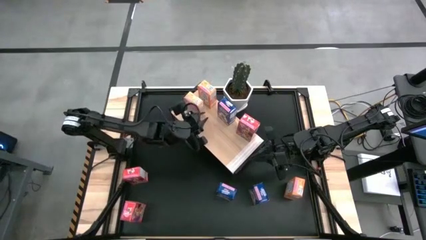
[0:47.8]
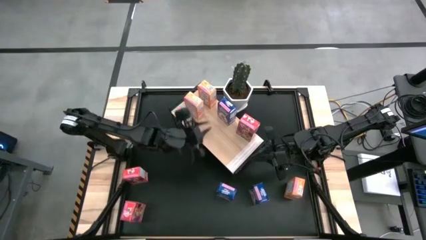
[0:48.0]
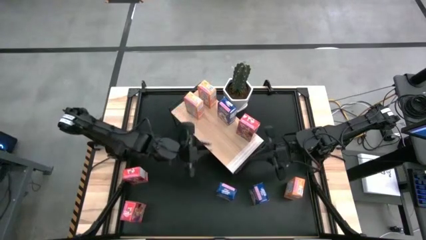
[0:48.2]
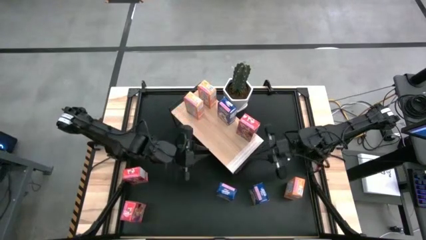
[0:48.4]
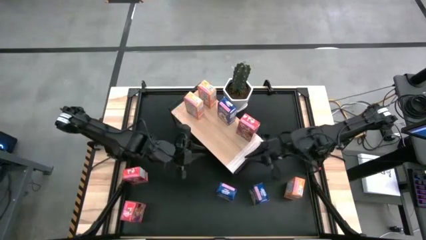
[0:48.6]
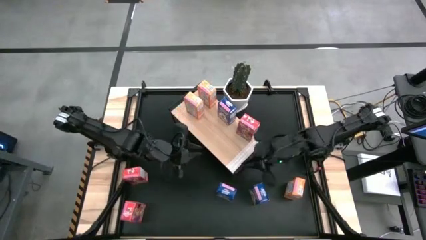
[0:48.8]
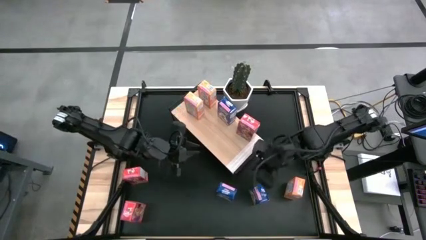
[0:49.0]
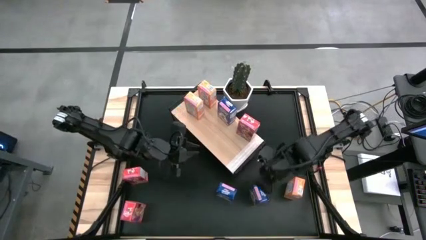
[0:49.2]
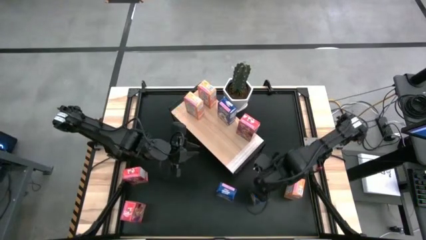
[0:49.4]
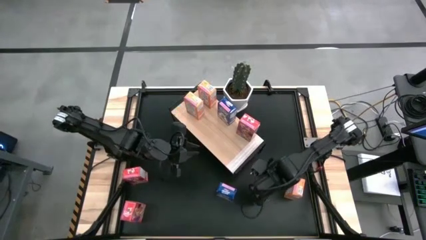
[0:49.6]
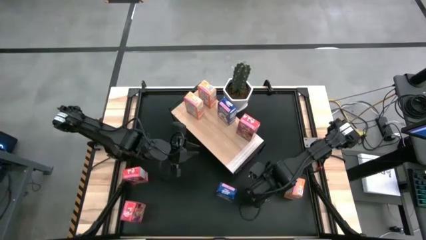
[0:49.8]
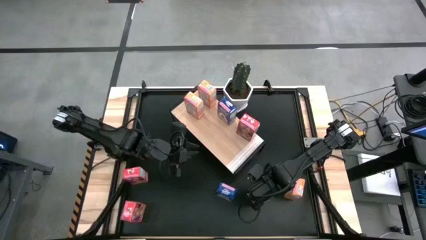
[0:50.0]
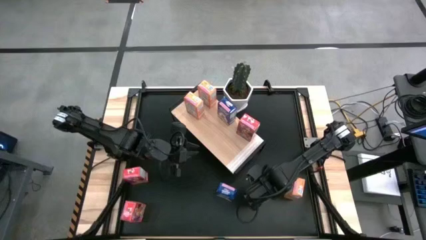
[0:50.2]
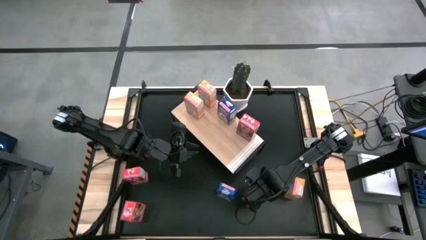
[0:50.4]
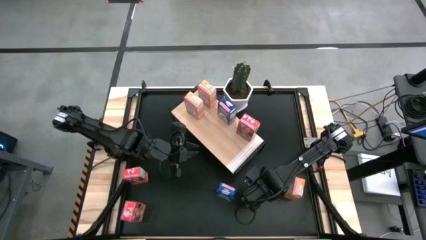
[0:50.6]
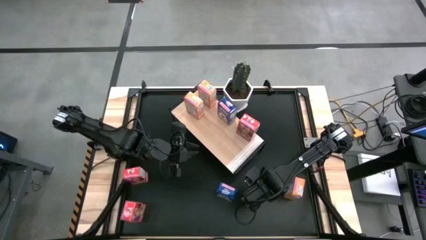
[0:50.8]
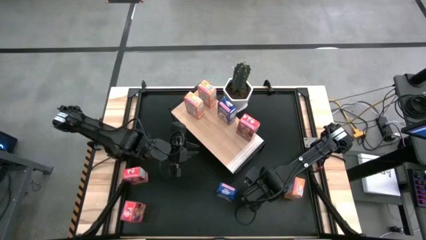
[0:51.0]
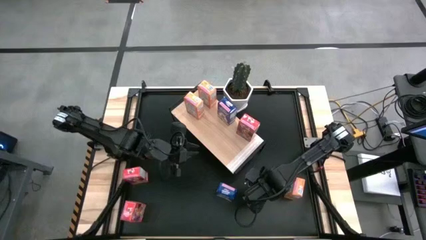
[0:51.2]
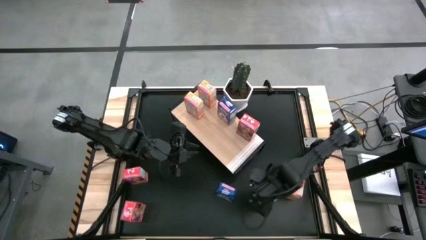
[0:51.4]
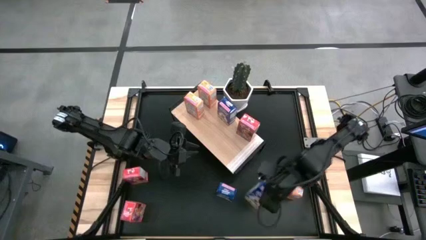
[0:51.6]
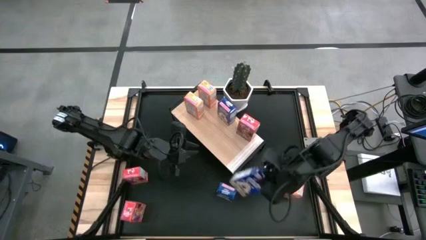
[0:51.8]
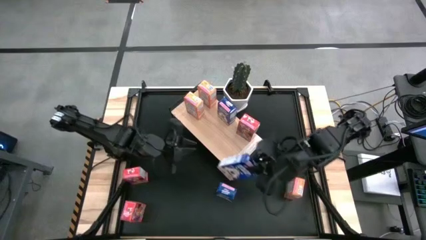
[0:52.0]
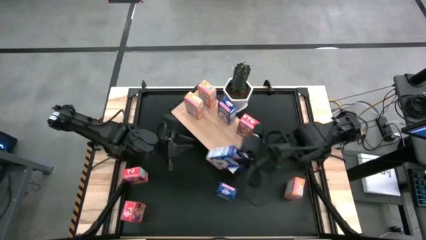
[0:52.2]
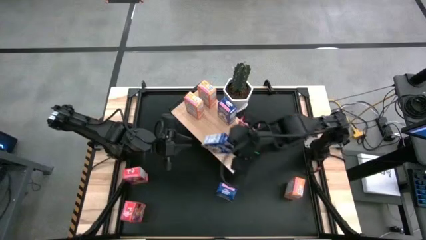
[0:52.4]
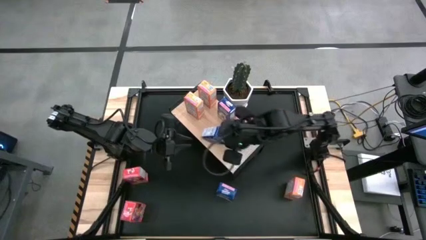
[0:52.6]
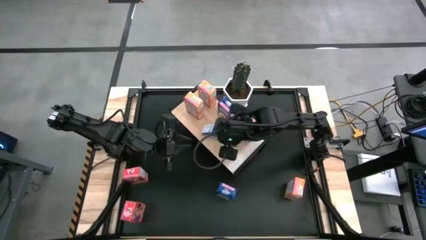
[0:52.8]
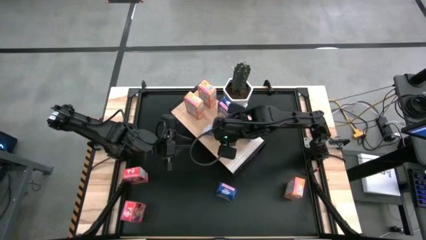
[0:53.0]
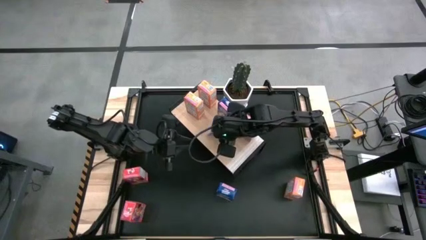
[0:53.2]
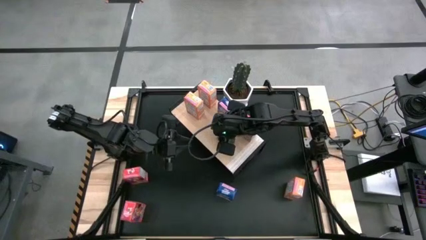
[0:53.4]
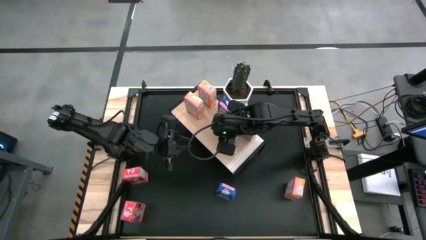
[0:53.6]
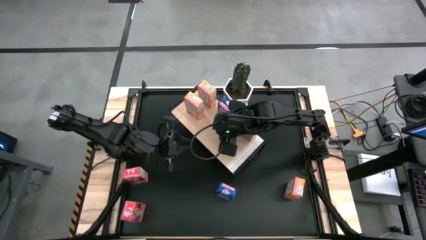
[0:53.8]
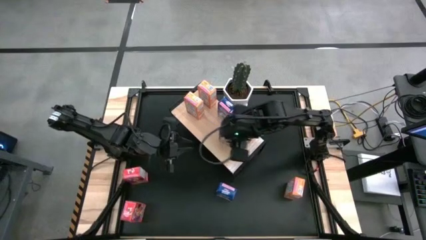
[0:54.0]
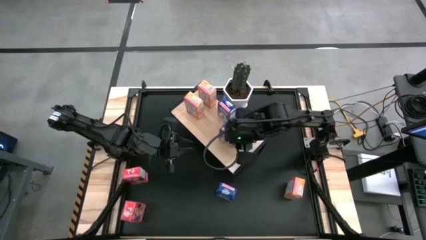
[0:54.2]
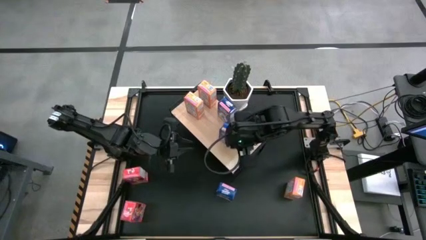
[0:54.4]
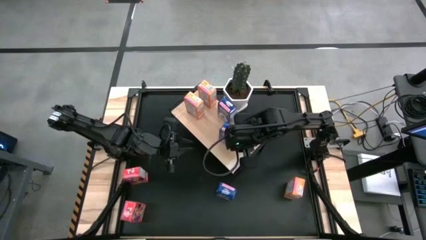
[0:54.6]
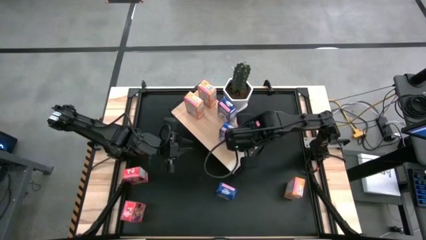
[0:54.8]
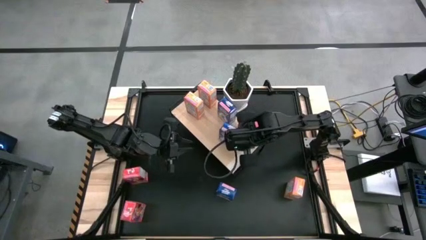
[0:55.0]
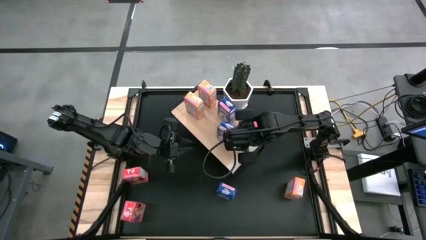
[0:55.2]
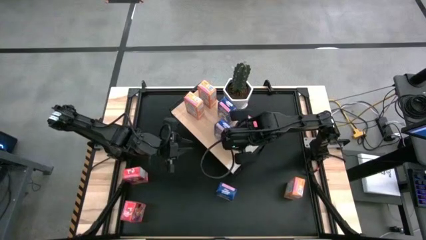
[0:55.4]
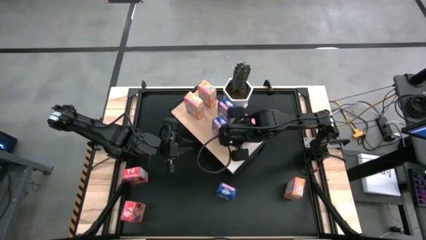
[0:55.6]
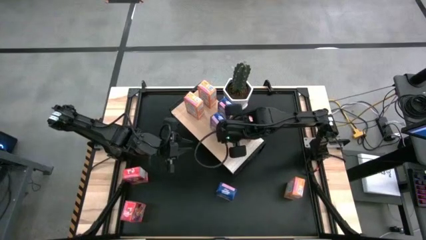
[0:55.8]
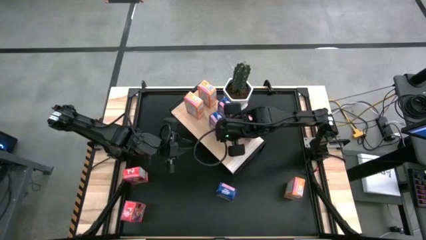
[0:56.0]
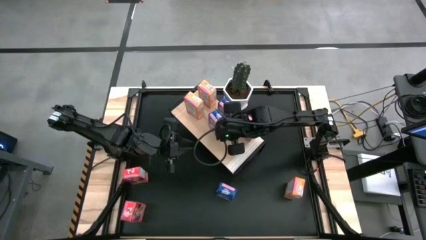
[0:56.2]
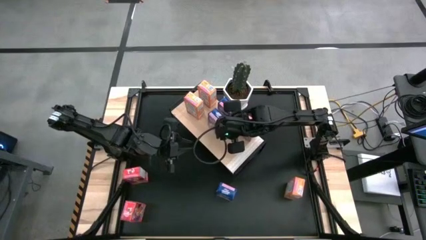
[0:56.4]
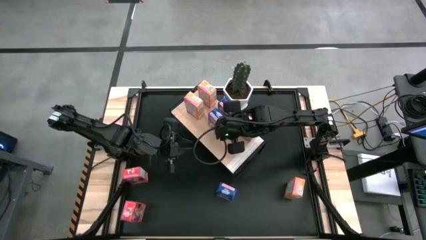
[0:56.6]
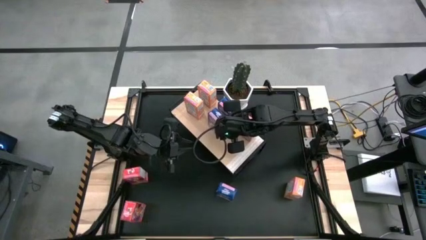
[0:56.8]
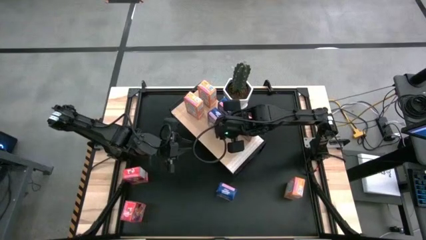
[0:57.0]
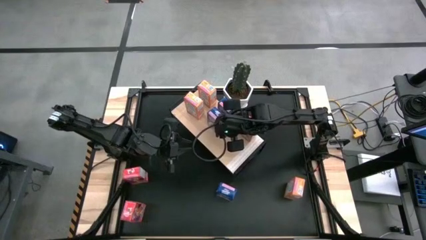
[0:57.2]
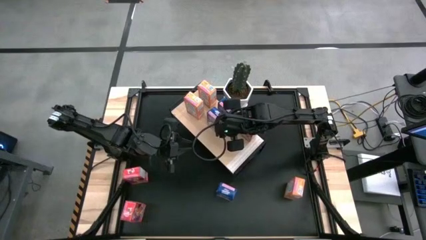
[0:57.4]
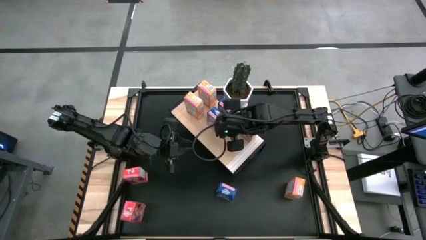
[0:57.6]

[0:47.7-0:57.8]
Task: Stack cereal on shelf
Put the right blue cereal box on the shelf aligned with the other blue cereal box

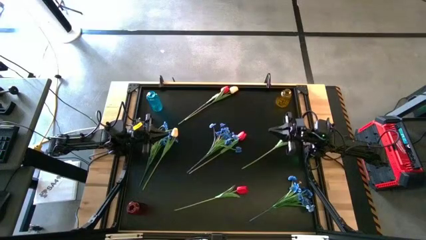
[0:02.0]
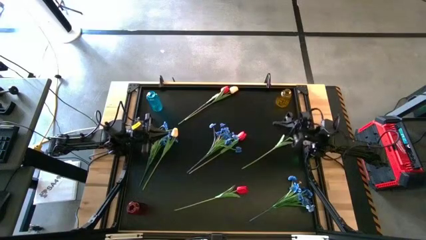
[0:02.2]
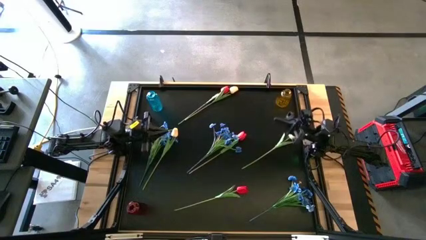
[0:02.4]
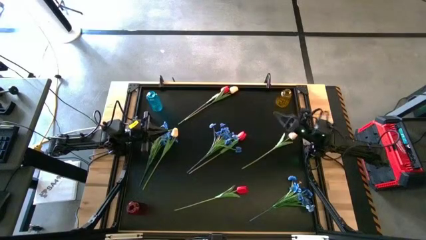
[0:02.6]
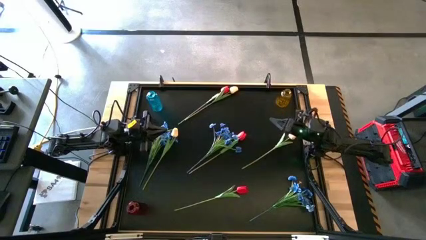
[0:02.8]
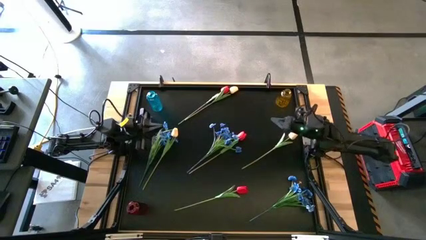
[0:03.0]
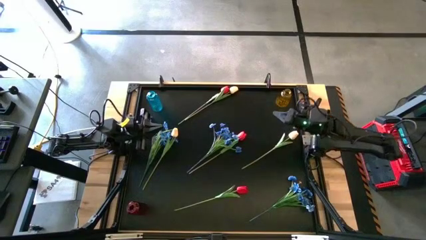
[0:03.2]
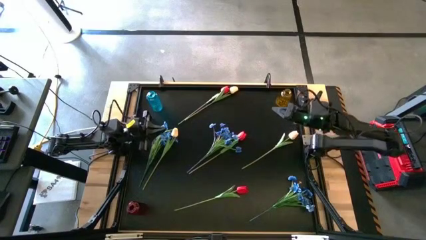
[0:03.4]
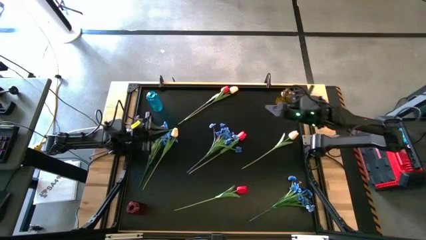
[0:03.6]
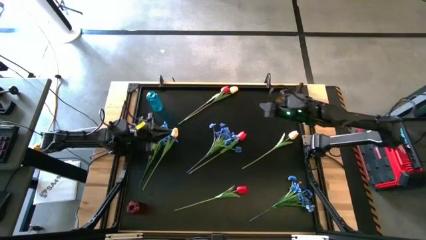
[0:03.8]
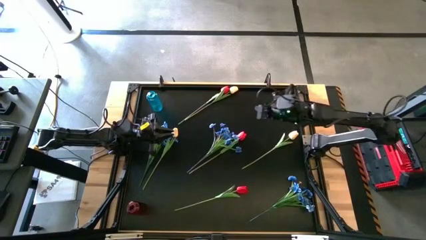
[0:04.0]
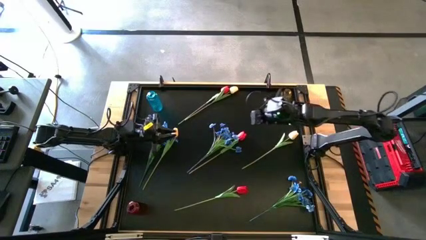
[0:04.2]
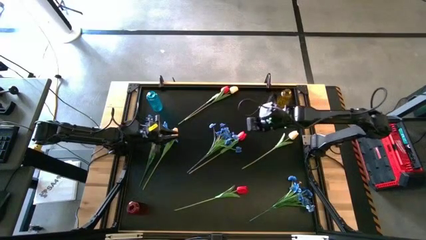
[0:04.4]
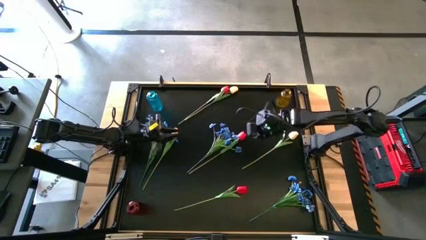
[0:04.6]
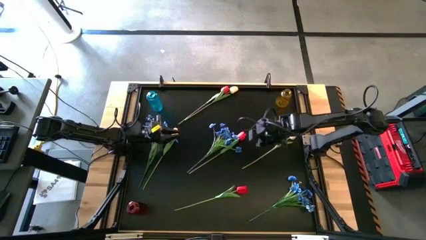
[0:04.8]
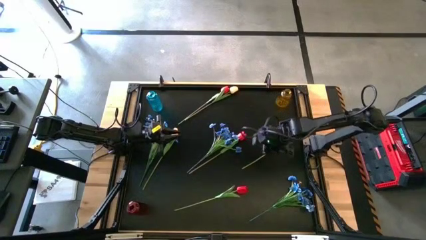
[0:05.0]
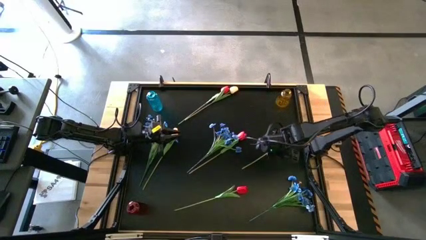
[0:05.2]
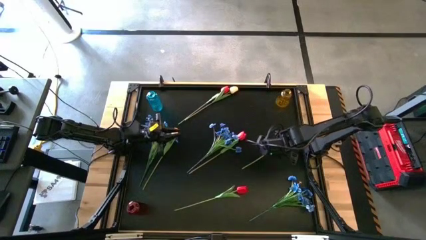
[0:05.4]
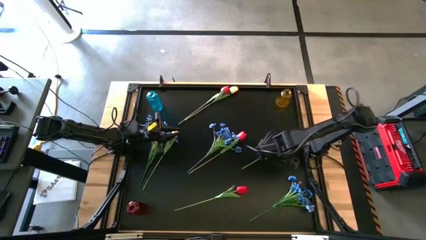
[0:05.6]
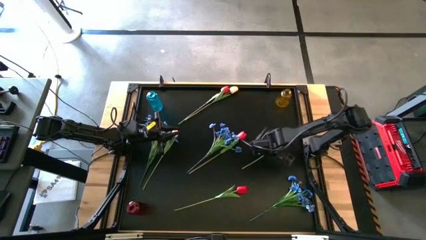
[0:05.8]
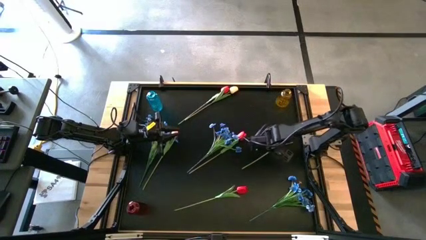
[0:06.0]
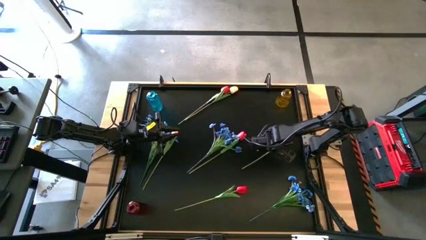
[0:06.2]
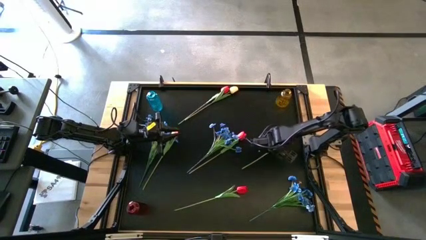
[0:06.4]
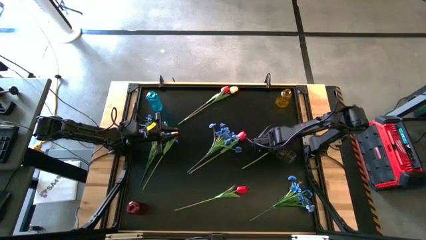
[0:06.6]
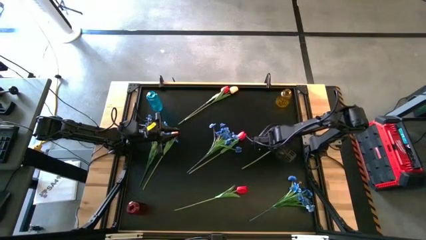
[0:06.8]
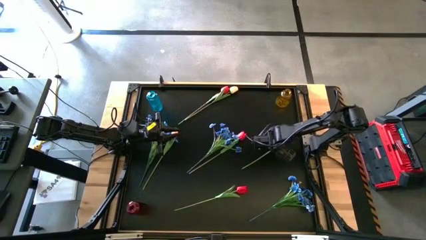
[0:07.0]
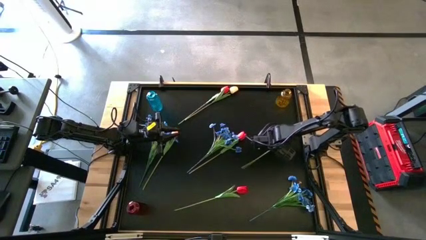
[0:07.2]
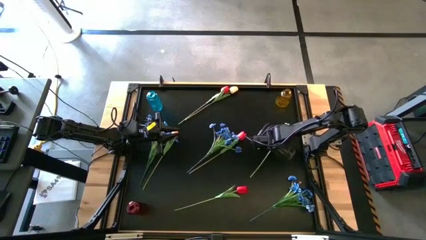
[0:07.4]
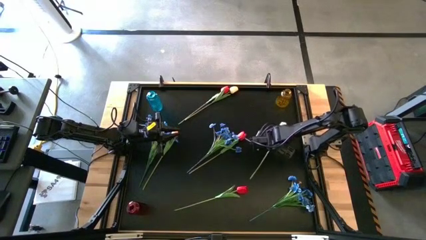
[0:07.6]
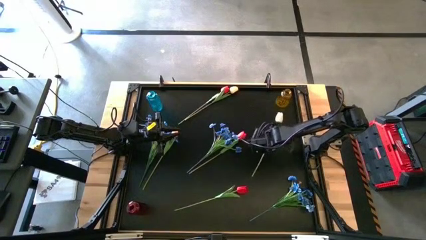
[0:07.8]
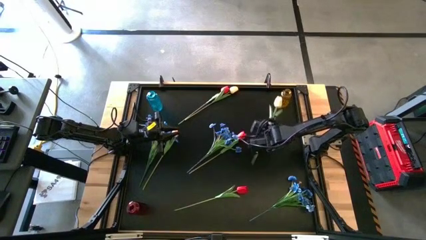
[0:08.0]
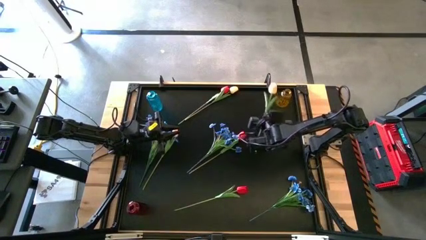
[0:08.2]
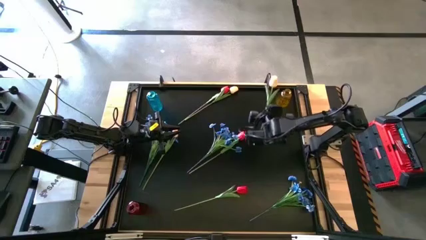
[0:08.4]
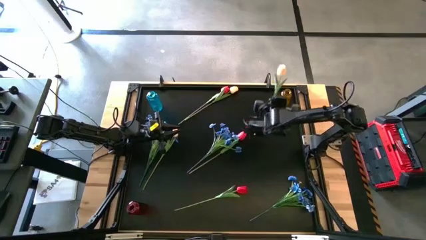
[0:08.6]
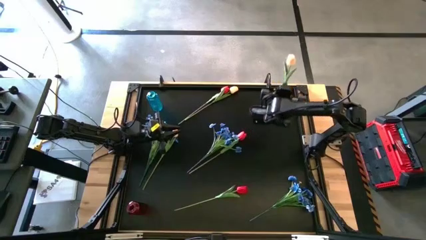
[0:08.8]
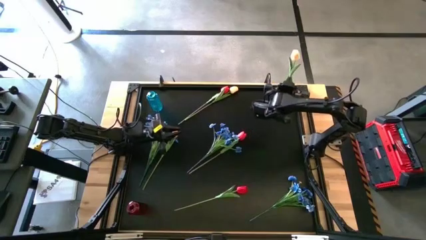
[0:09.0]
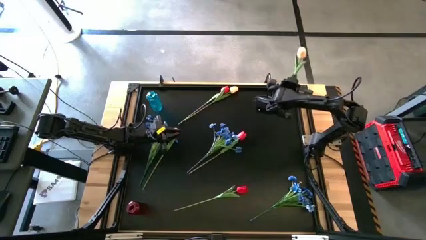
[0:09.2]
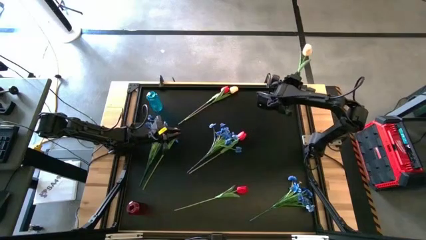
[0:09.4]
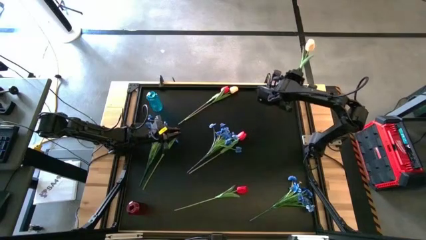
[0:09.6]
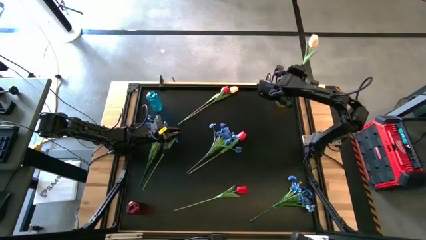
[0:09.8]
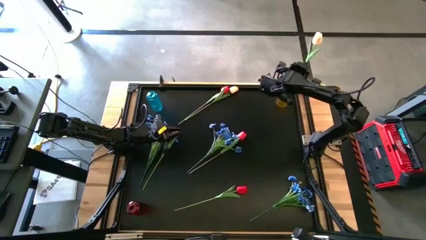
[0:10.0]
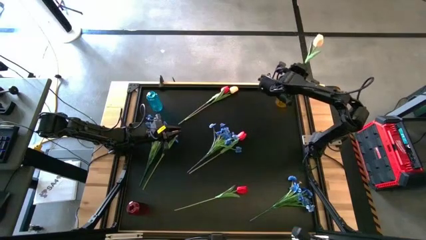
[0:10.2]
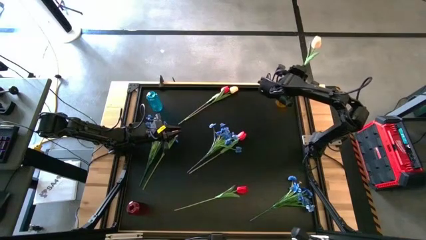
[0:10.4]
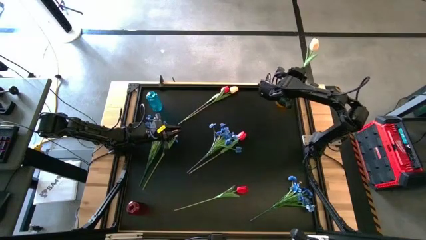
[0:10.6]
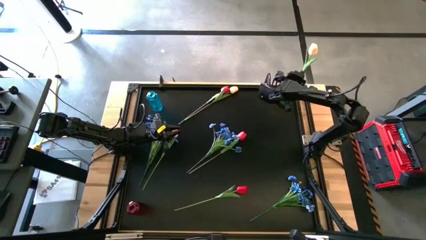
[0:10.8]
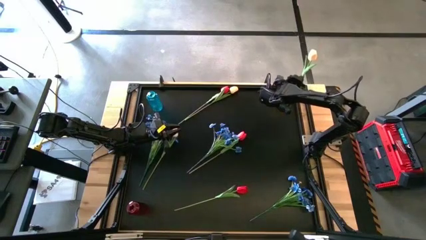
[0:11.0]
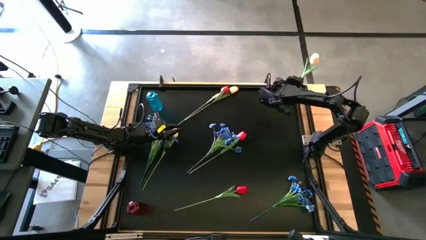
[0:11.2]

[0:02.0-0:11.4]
Task: Sort flowers into vase by color
Put the right yellow flower into the yellow vase
